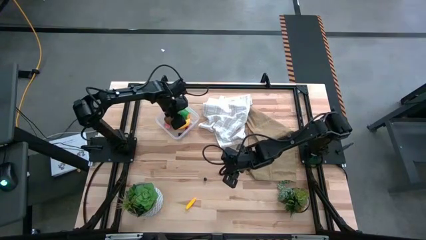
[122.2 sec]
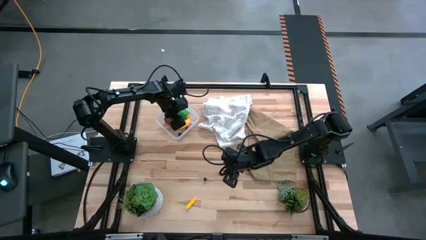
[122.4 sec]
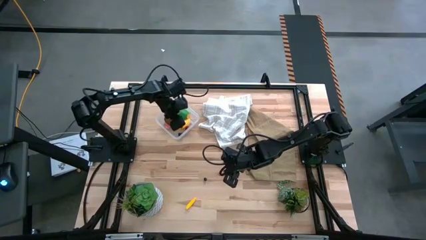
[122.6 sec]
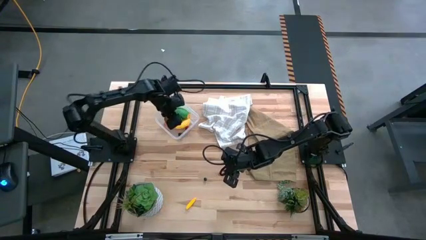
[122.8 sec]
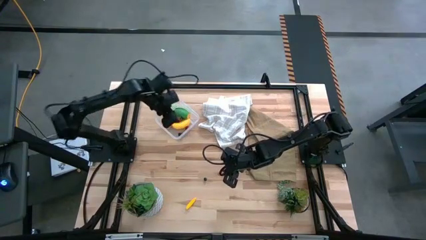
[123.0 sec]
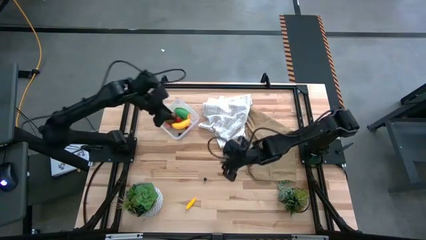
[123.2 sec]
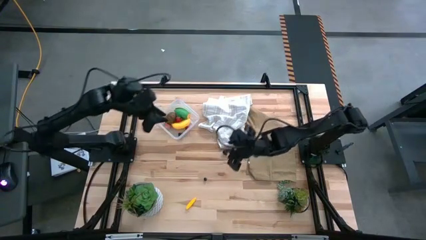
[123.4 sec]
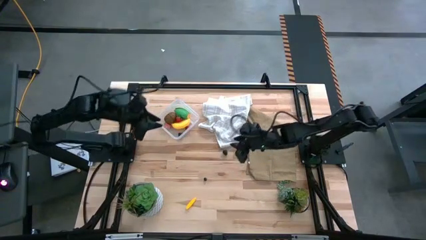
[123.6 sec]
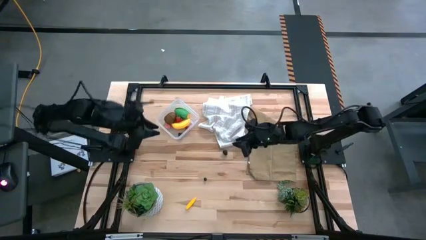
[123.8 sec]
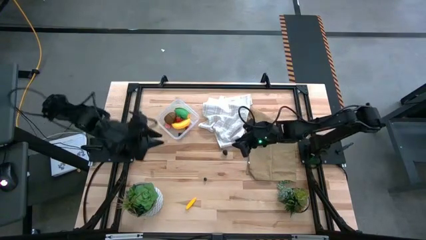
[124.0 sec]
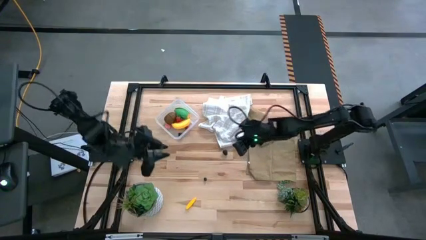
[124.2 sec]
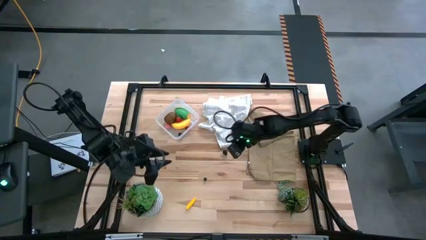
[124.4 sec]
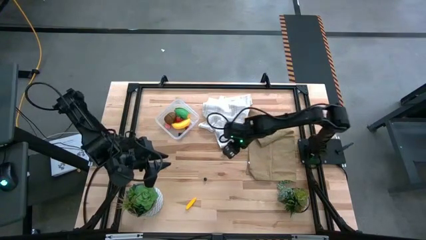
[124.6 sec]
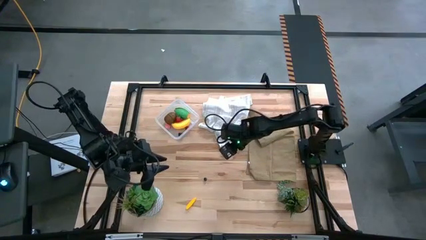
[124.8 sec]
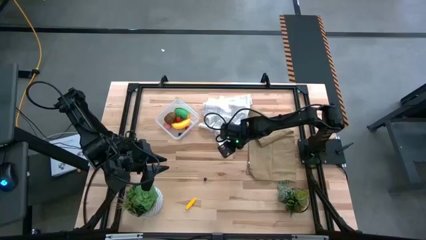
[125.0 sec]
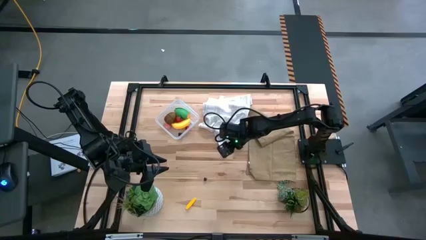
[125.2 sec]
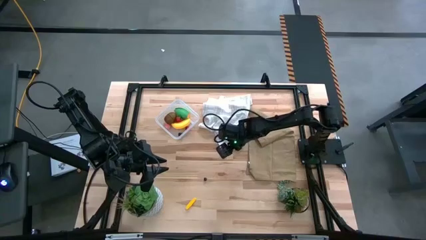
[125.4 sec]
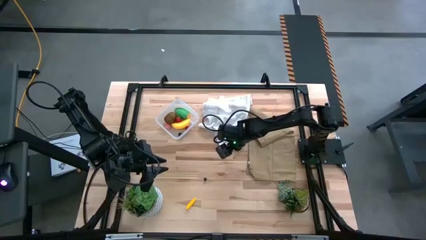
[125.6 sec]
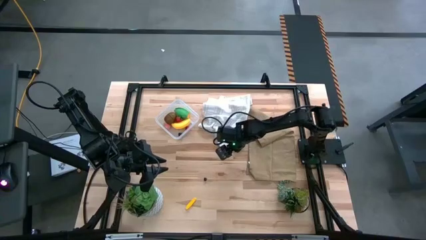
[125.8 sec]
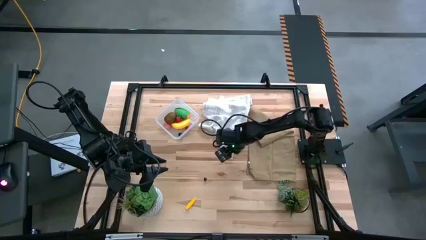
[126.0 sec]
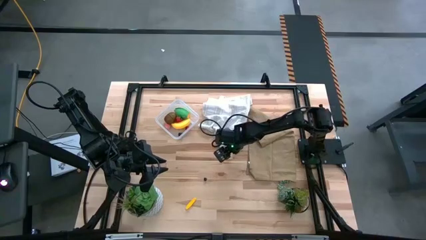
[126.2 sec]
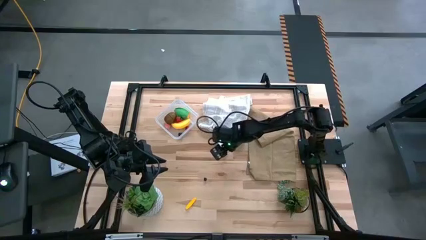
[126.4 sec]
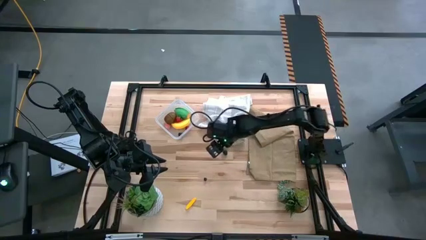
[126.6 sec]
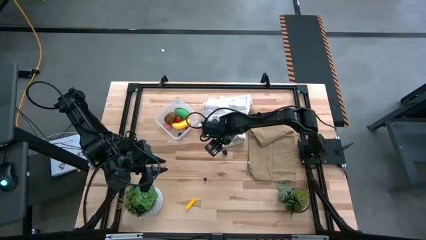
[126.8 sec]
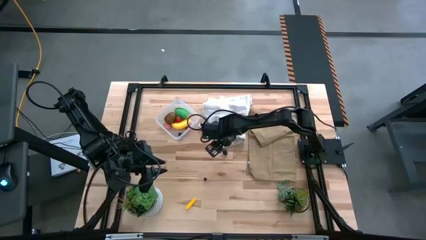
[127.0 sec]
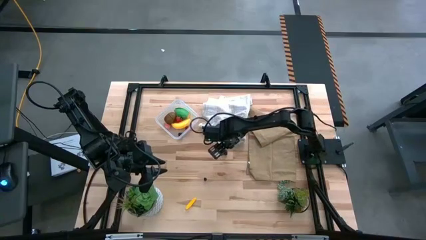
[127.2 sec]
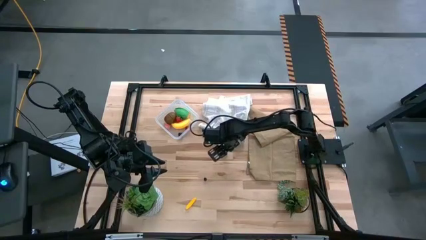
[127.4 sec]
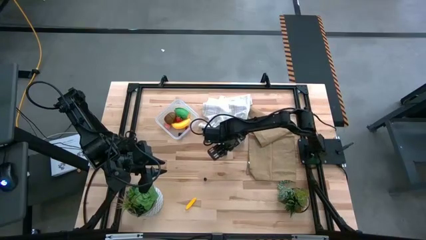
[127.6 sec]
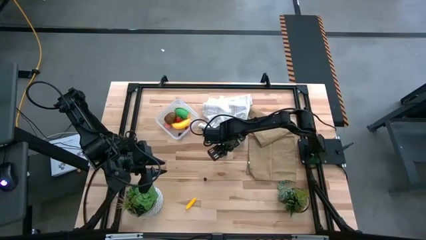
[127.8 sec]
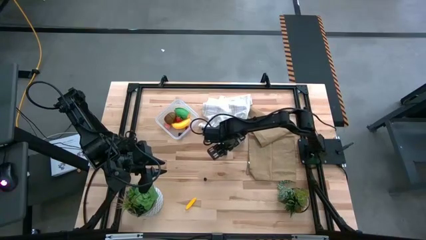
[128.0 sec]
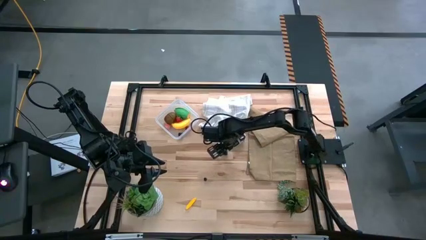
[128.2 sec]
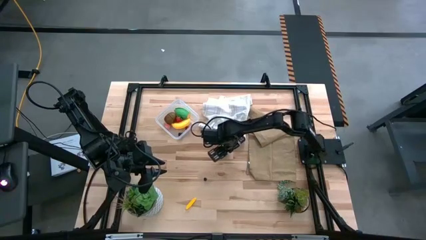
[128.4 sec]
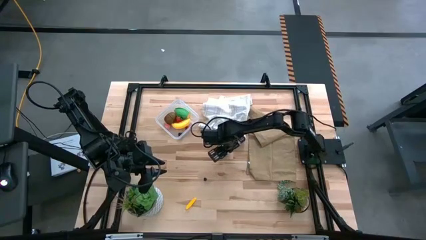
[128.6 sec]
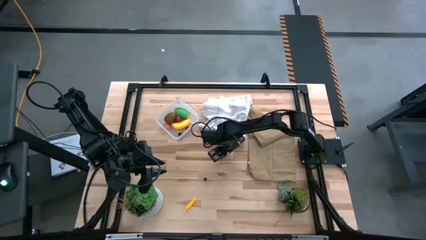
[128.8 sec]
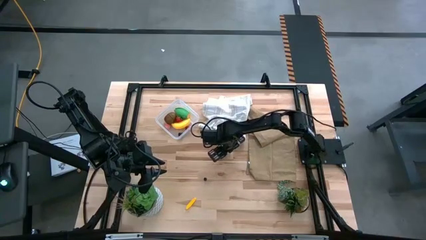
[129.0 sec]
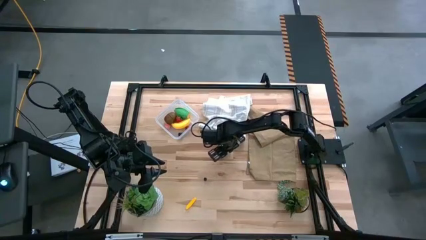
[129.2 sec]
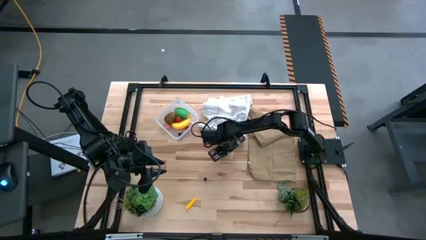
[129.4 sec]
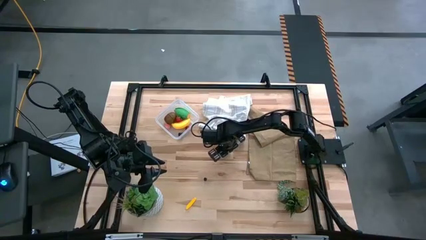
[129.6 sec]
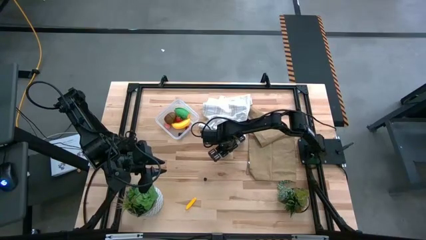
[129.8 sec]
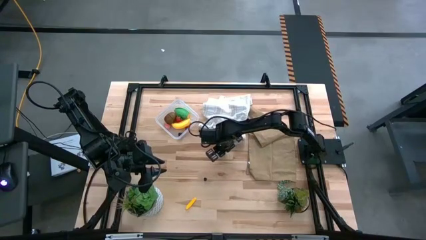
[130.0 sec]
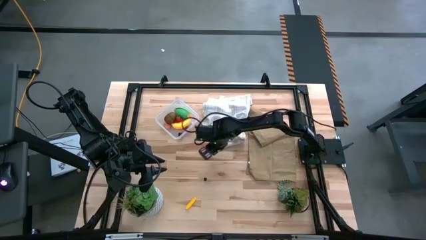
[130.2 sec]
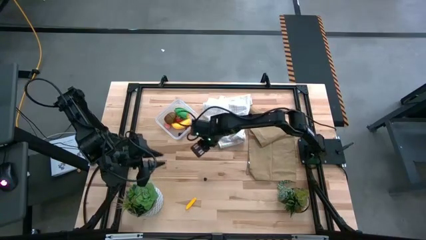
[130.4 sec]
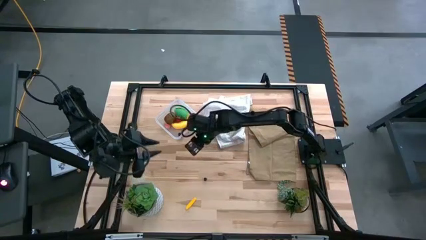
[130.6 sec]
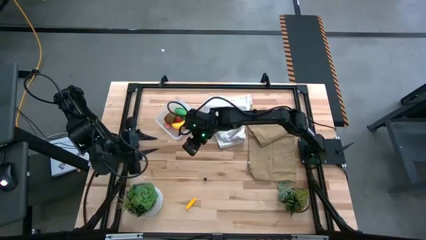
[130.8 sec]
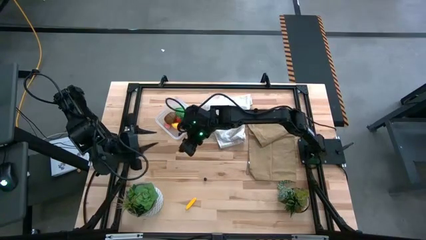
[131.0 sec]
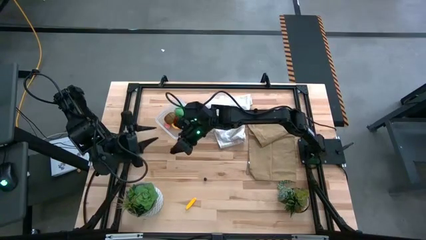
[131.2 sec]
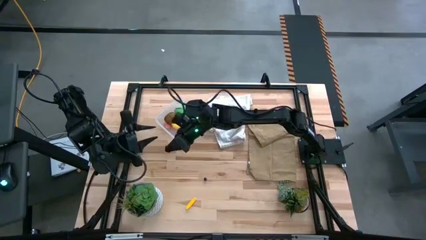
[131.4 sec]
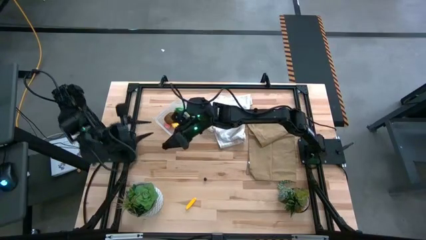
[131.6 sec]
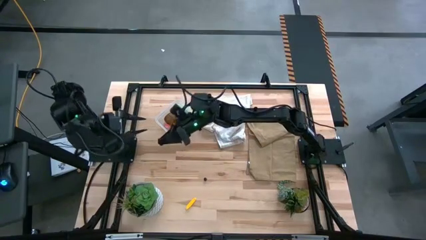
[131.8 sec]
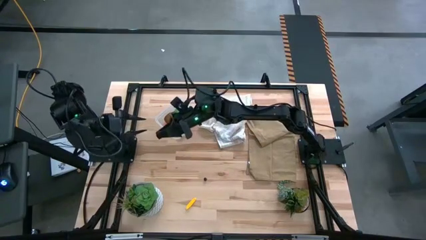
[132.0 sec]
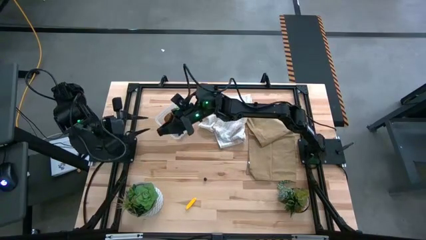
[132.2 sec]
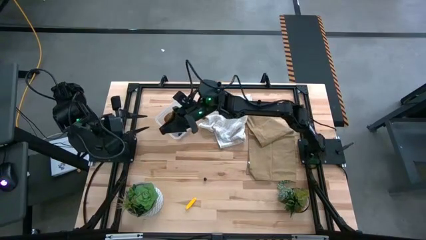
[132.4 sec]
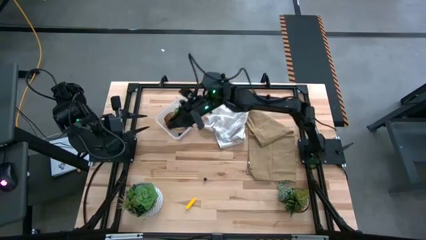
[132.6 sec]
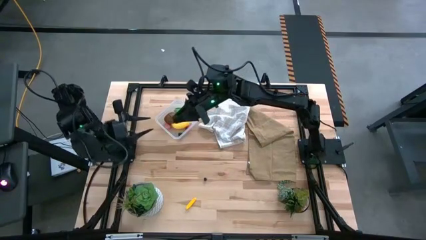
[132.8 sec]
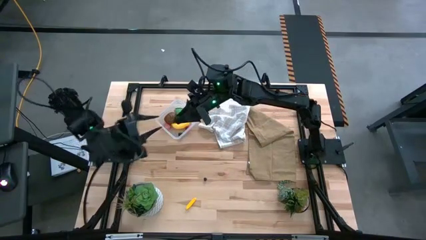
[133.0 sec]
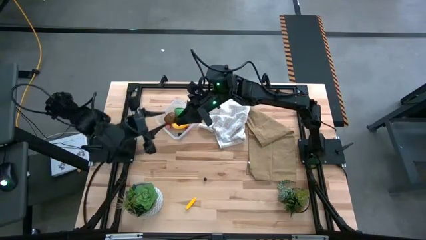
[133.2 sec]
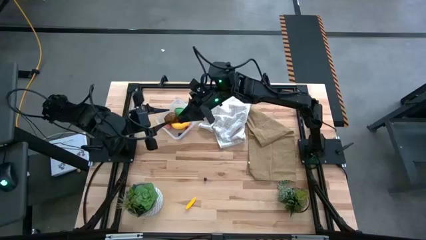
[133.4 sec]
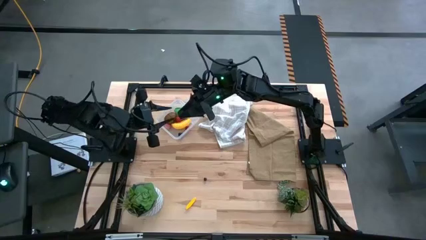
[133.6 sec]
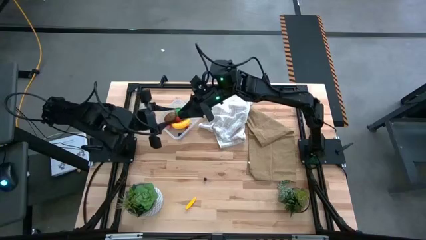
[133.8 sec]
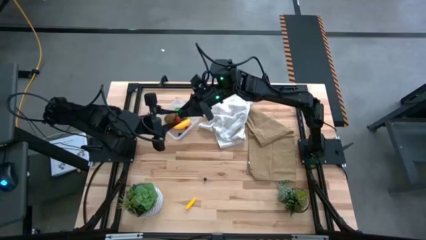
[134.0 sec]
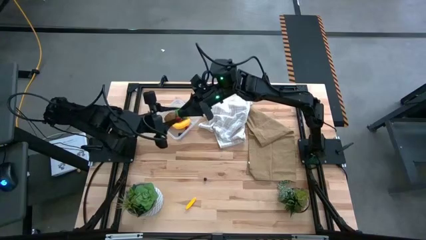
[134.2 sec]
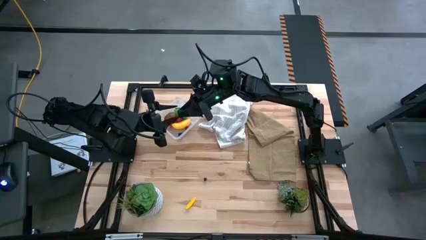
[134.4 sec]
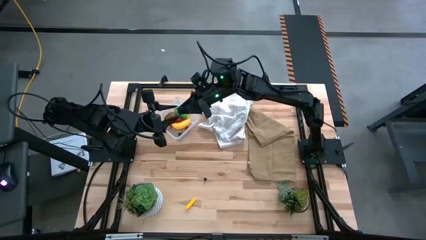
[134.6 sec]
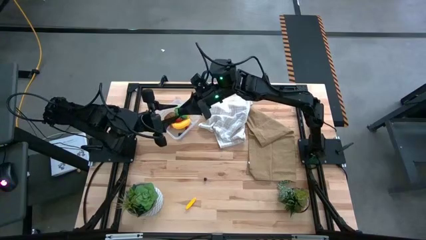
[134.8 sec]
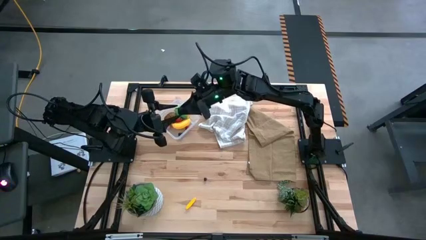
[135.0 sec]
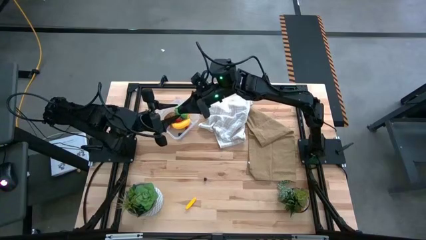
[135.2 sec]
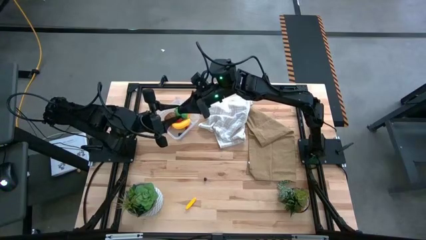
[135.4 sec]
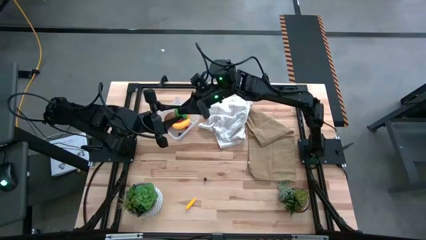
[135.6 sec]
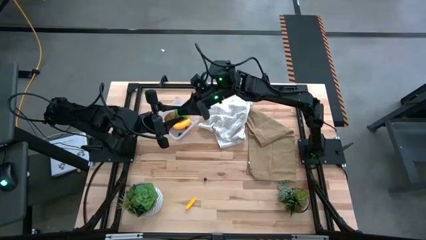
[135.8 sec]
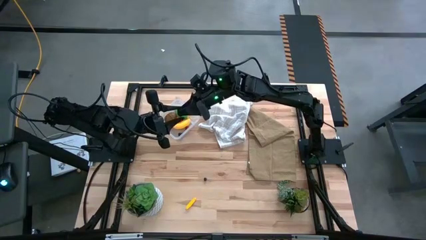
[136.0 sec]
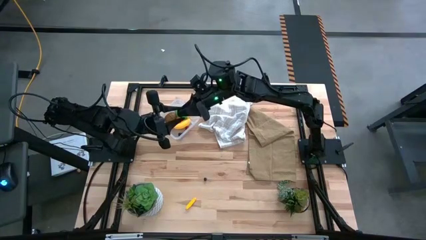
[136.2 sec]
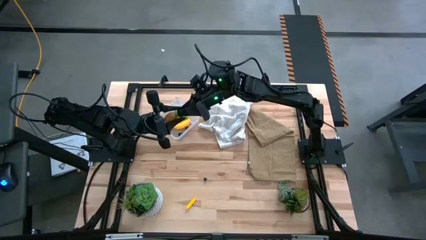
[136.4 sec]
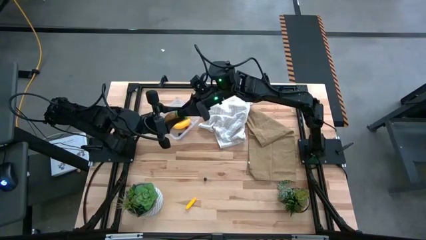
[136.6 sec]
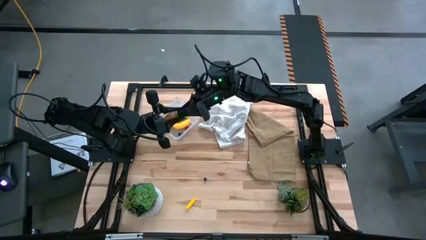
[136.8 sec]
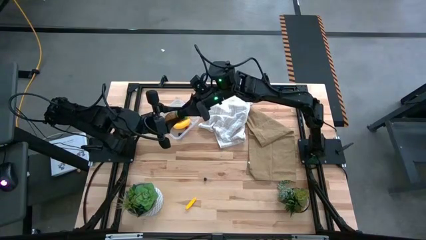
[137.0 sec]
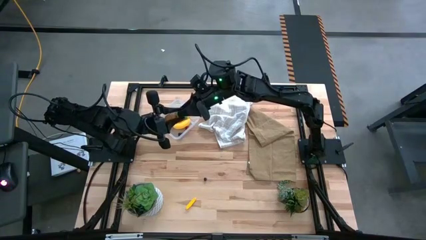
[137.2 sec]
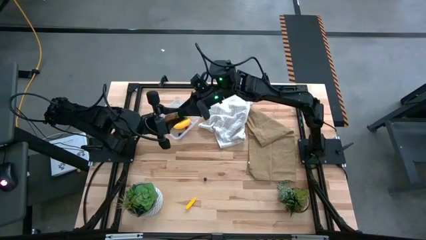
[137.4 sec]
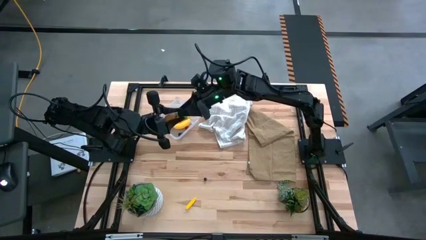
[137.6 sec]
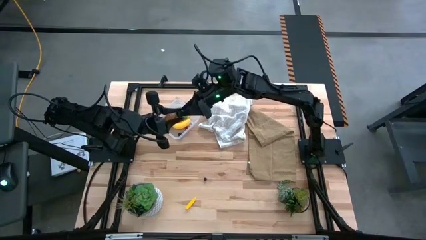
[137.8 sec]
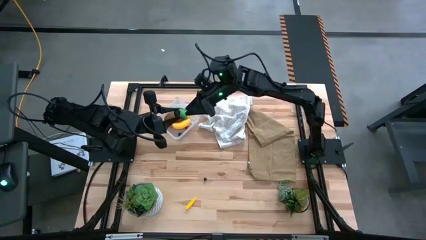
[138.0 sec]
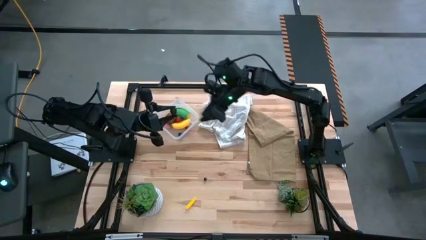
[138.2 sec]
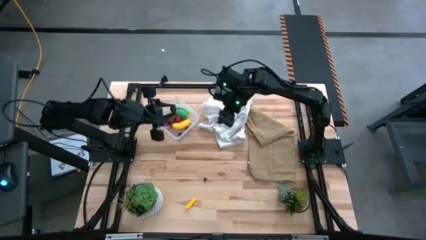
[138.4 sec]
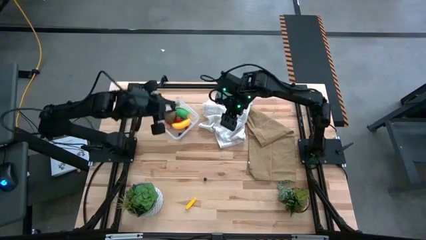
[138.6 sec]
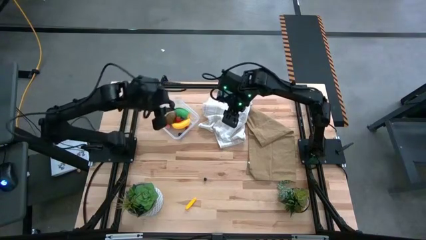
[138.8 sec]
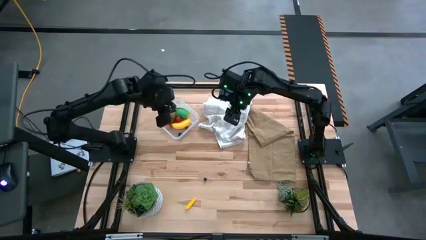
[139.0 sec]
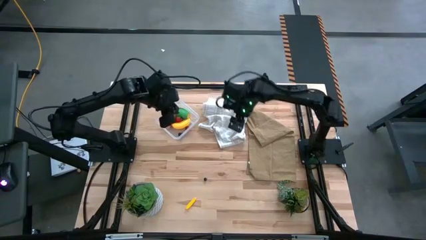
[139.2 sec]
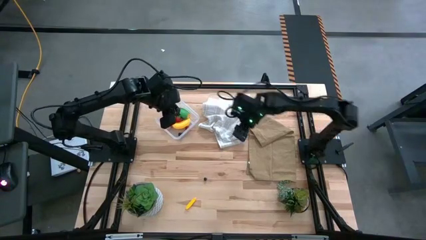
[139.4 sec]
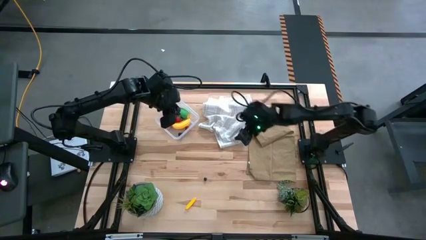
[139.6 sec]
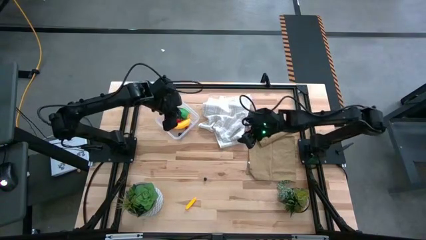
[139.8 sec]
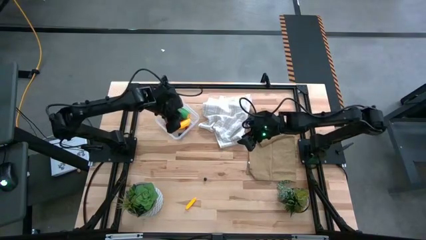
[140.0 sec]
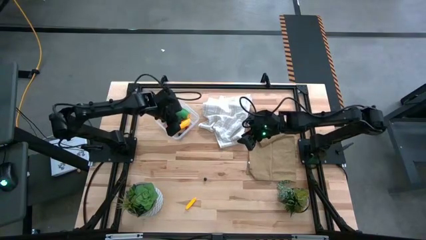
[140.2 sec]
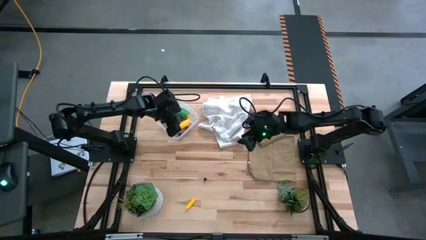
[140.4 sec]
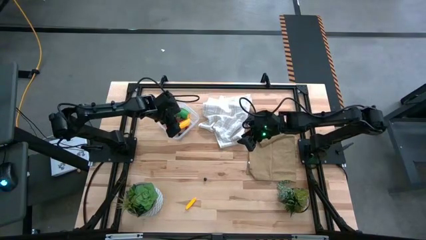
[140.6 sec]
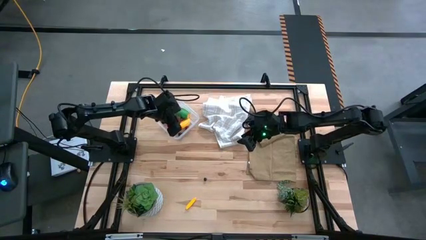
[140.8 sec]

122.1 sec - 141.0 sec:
Task: Pick and placing Produce into tupperware
Put the black blackberry into the transparent bin
